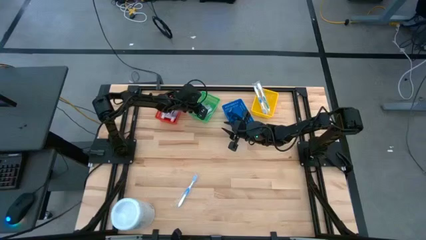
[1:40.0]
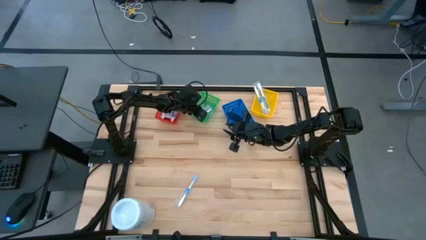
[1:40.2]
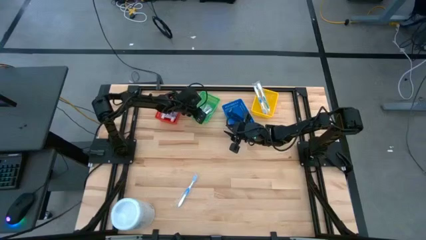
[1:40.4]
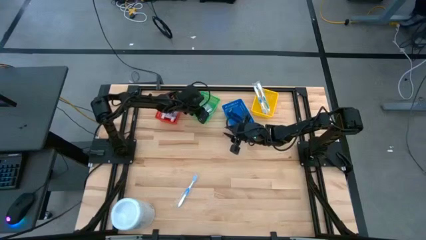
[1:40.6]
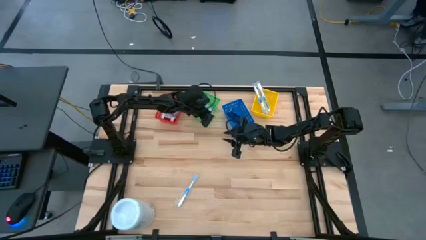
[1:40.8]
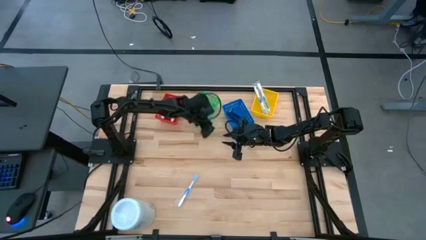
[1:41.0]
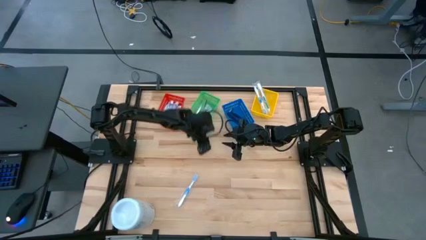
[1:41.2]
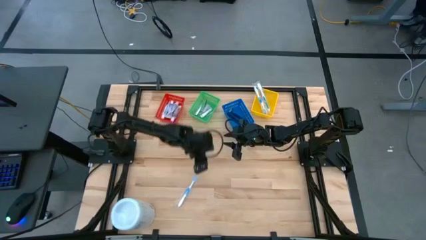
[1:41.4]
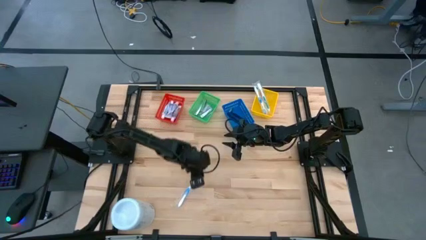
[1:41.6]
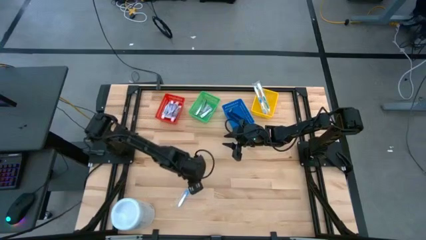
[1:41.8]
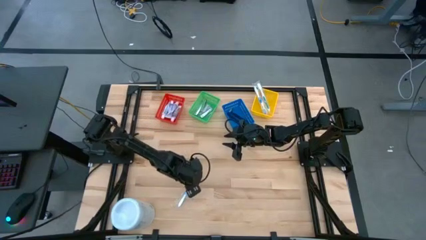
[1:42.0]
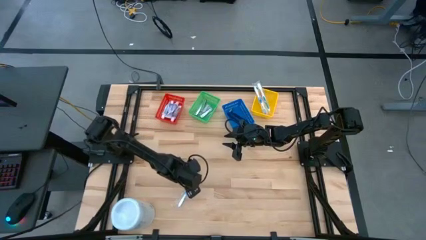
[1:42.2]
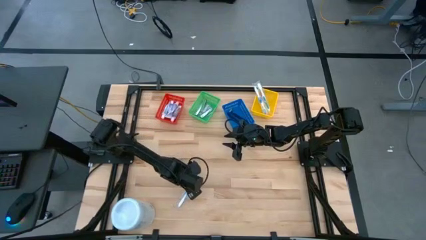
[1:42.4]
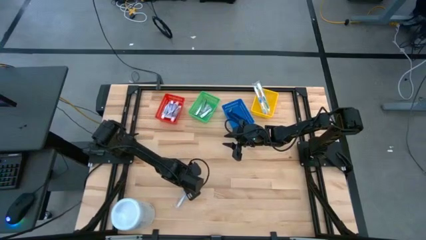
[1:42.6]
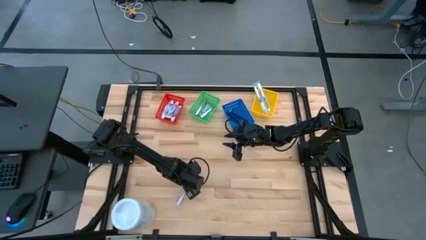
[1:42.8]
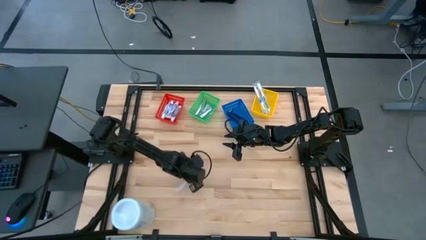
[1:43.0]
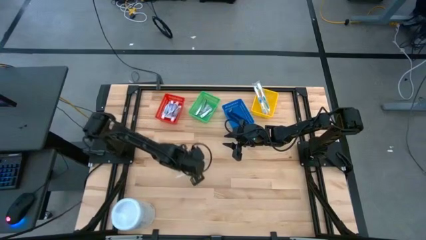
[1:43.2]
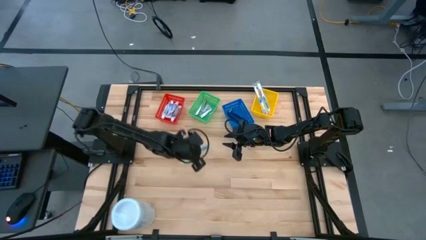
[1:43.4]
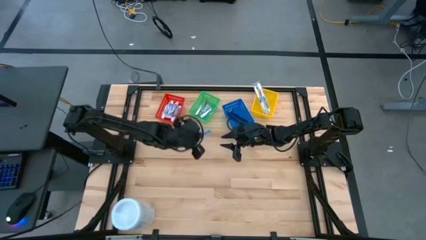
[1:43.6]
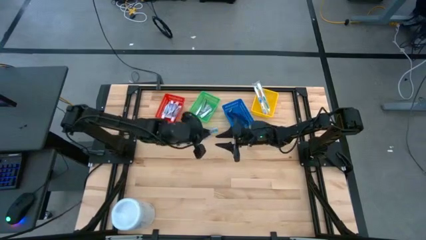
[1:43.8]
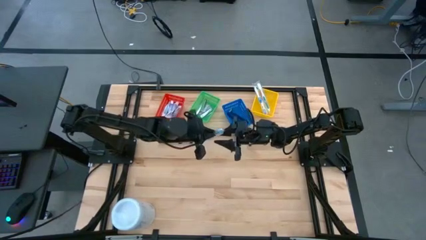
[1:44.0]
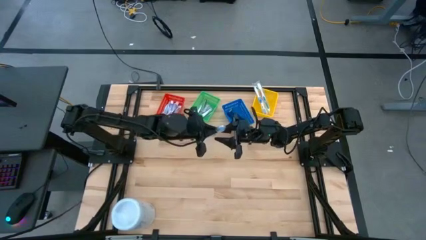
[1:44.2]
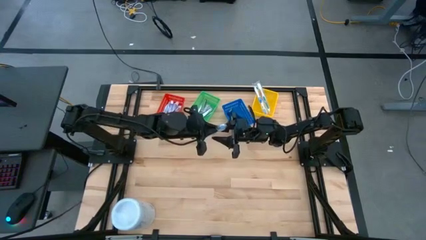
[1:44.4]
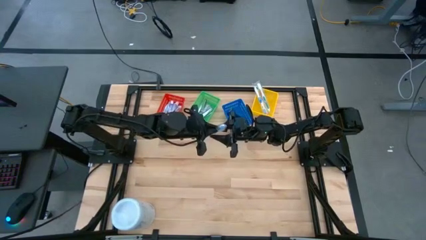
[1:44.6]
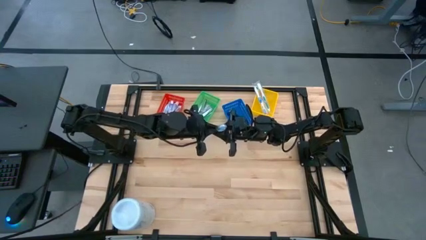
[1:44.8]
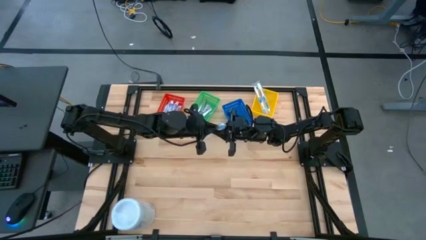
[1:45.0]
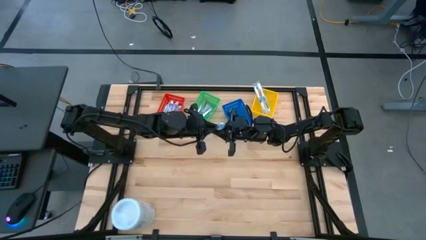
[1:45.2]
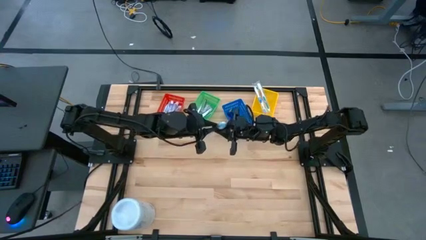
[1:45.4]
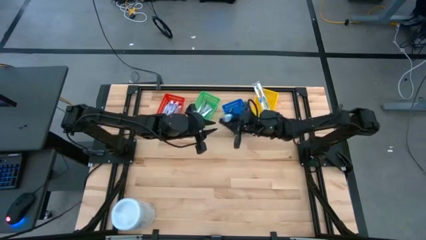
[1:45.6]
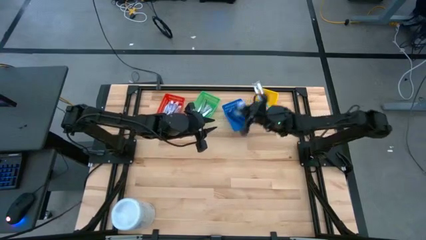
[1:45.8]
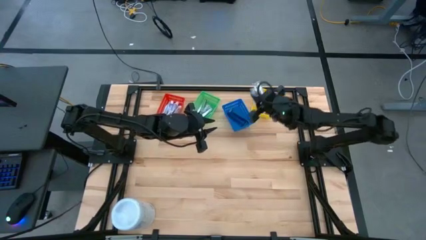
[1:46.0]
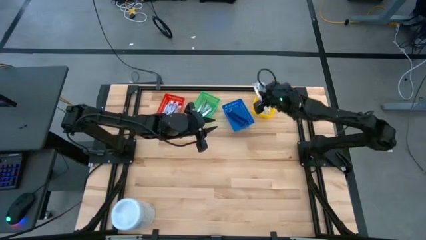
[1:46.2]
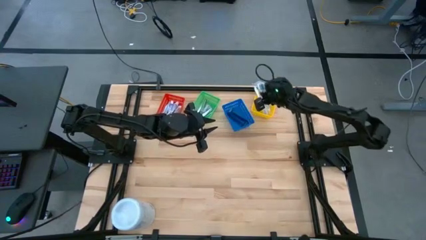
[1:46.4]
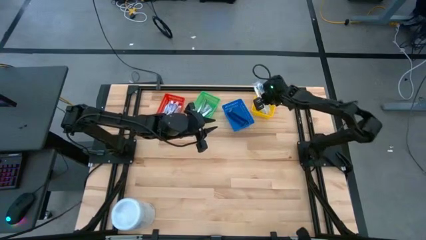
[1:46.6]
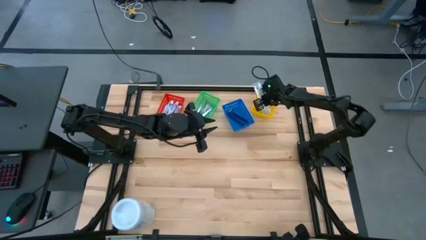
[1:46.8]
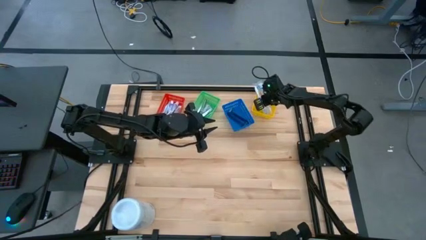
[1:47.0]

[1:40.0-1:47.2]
Task: Pick & Place Travel size toiletries
Put the blue toothbrush in the yellow bin

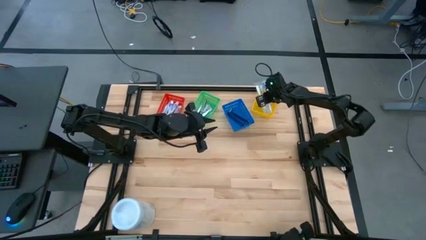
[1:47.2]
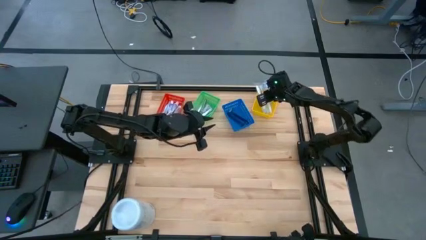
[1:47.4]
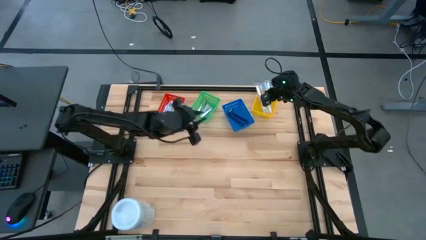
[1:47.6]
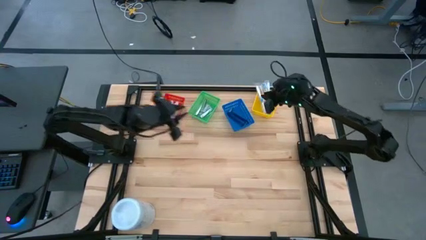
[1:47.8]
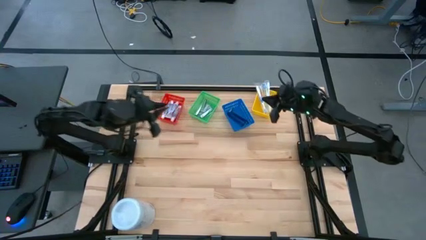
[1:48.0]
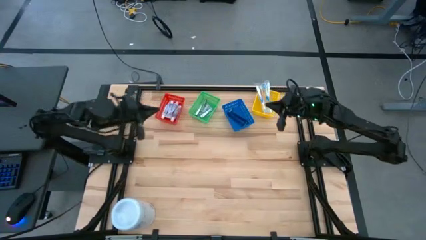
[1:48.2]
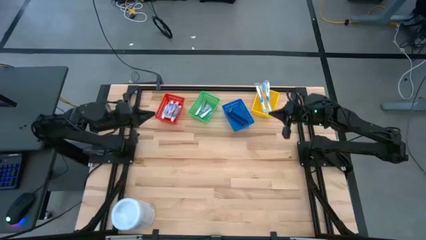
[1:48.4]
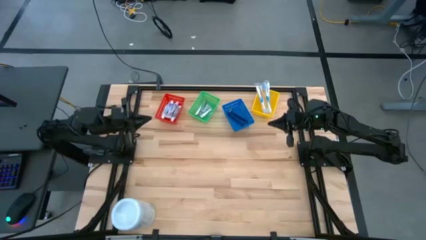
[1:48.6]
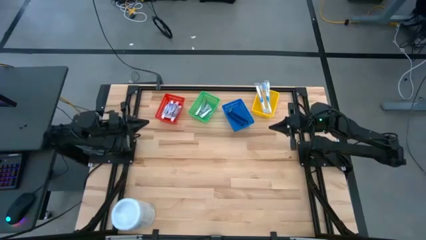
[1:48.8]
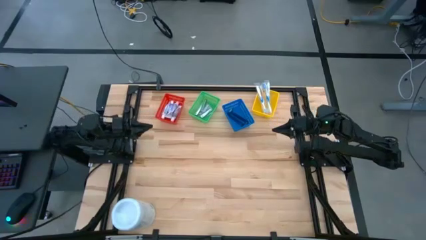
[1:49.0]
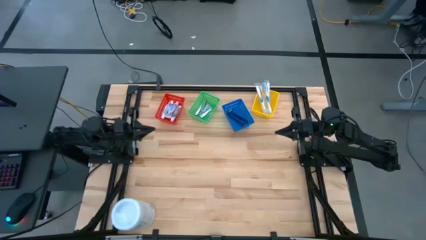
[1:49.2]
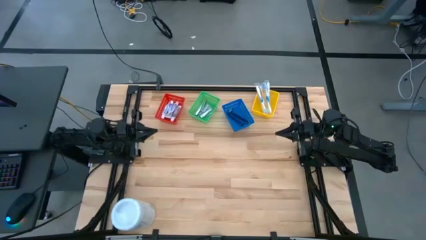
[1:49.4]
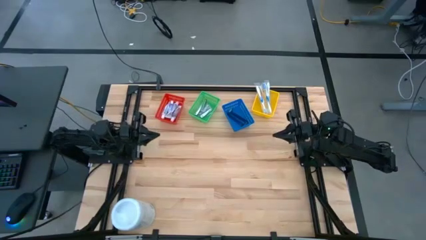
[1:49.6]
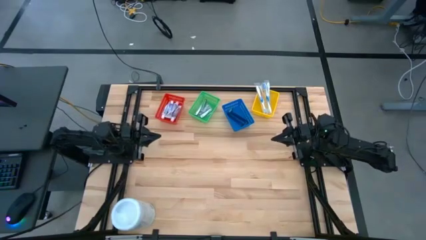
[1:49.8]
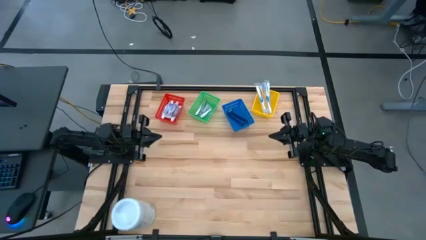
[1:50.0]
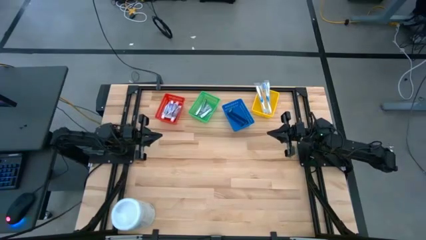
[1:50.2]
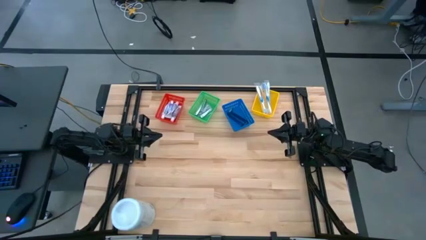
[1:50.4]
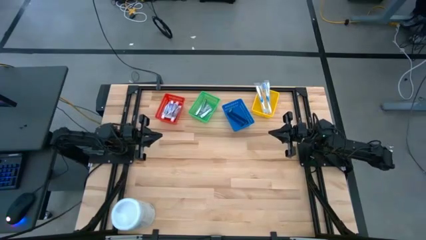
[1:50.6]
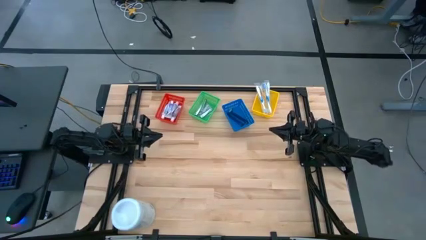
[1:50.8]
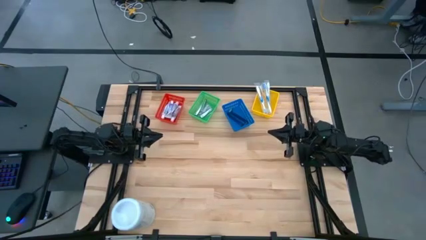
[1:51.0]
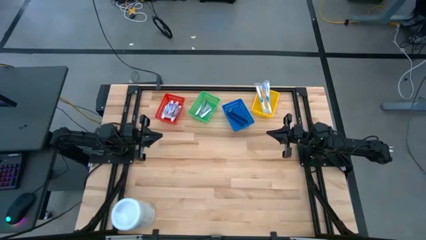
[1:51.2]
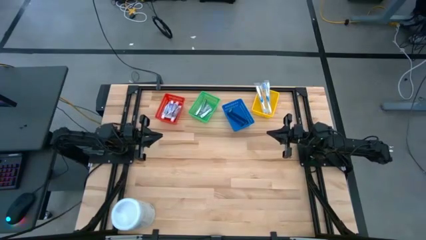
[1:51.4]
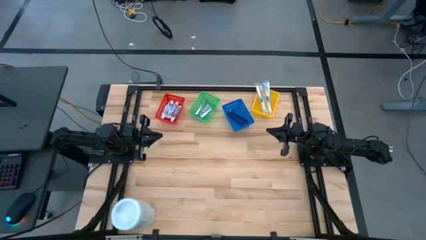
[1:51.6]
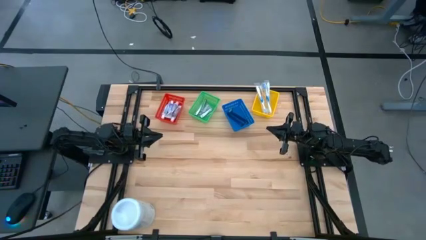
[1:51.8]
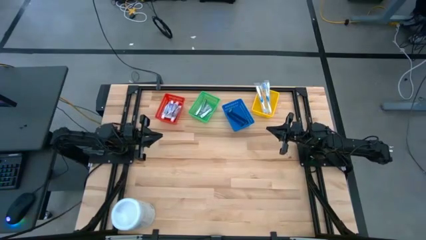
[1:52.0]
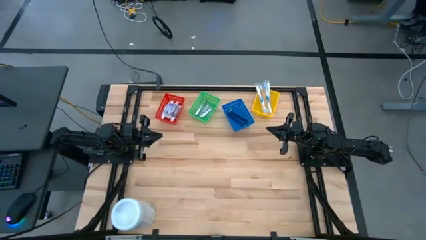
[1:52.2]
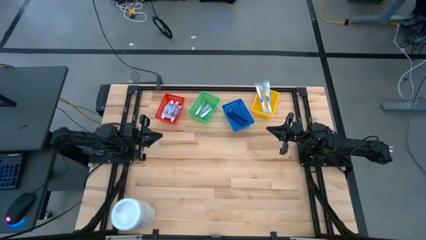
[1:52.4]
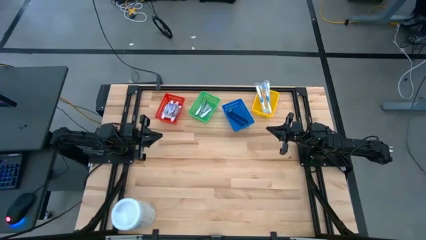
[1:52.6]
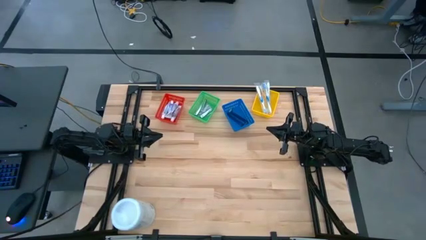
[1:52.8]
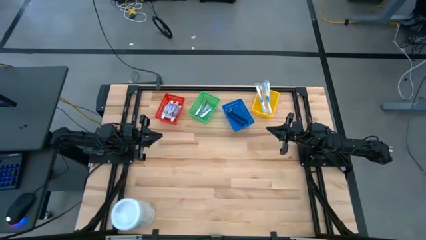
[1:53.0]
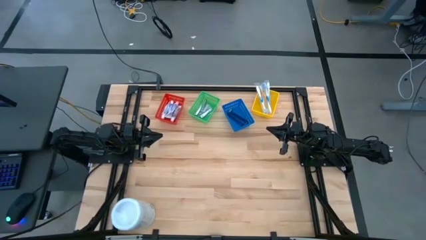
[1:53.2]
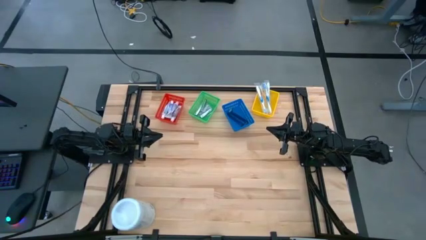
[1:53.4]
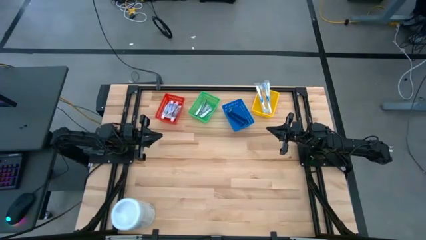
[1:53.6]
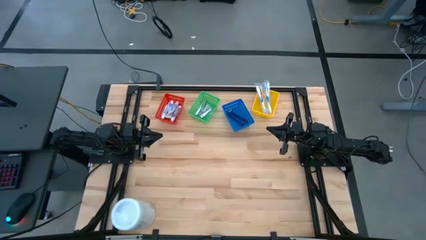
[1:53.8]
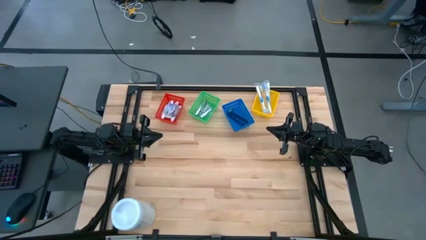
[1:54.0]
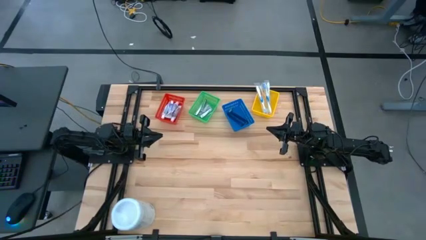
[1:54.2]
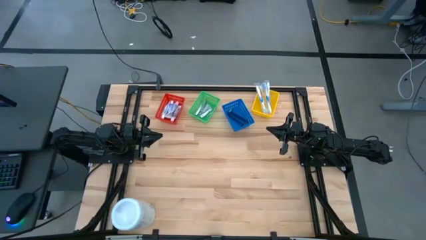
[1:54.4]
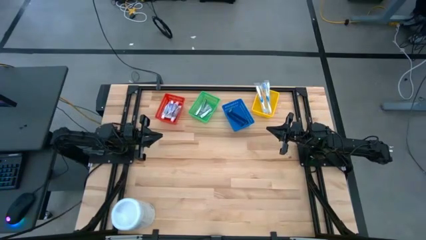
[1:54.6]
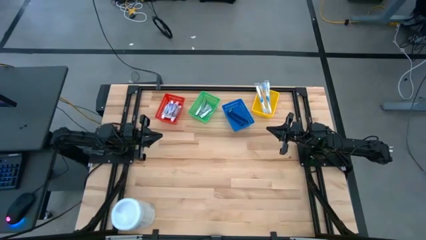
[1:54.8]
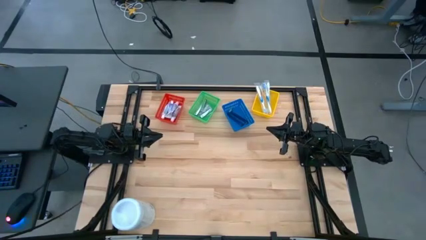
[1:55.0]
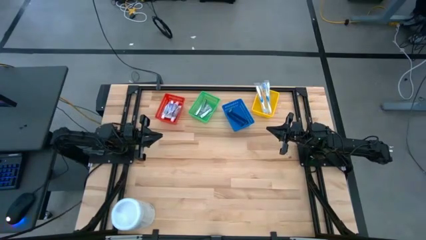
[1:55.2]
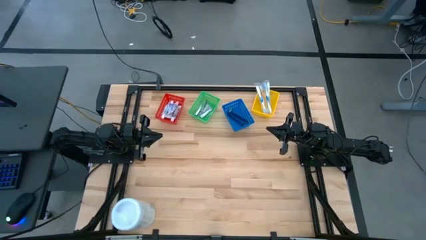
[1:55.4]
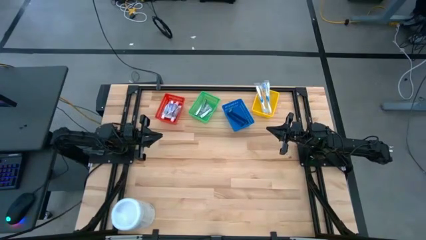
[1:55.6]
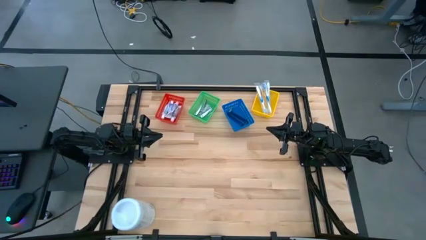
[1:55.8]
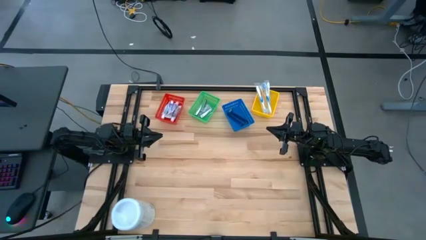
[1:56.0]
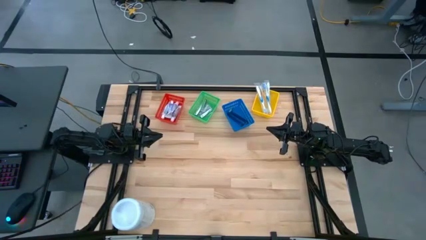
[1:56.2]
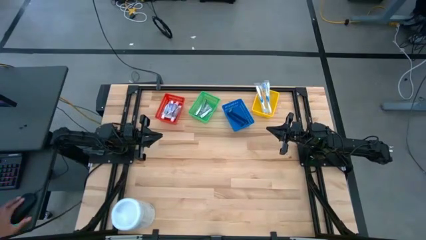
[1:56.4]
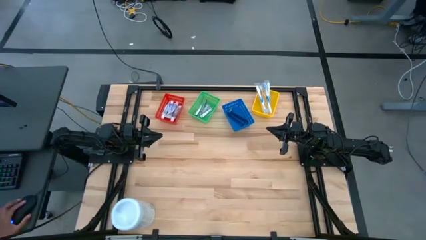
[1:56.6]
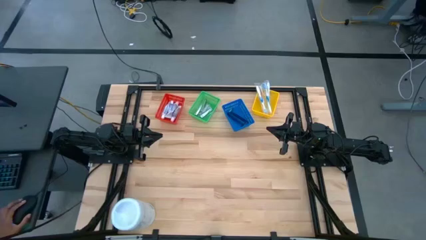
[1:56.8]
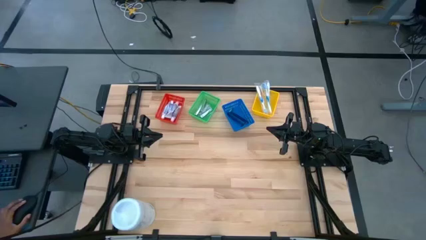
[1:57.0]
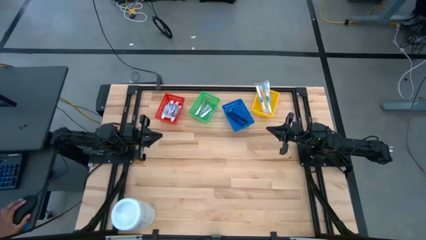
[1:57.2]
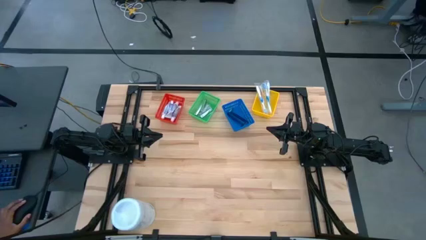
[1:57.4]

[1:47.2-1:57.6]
Return to Home Position
